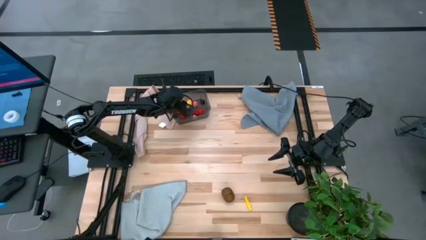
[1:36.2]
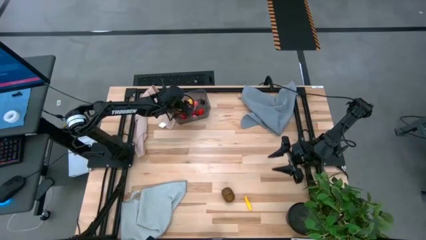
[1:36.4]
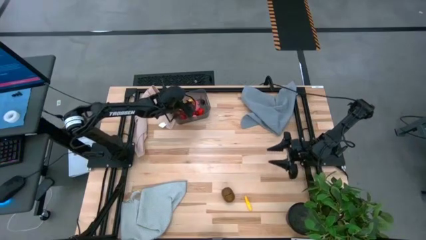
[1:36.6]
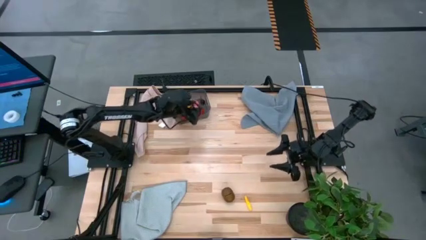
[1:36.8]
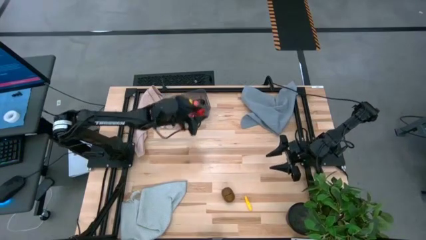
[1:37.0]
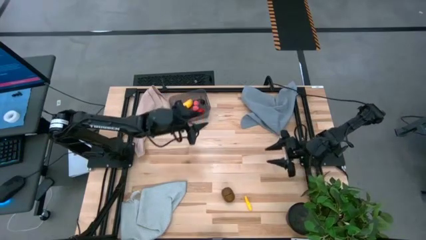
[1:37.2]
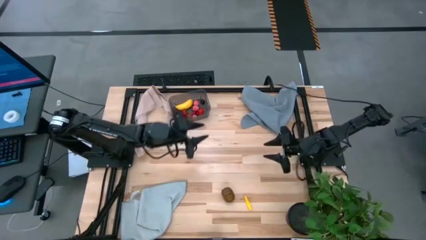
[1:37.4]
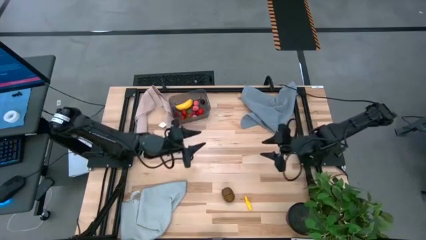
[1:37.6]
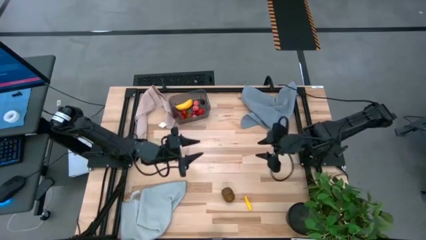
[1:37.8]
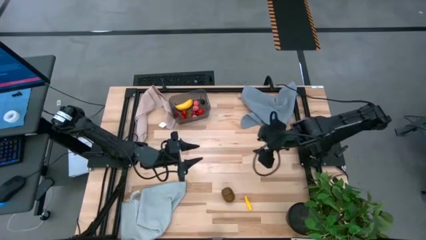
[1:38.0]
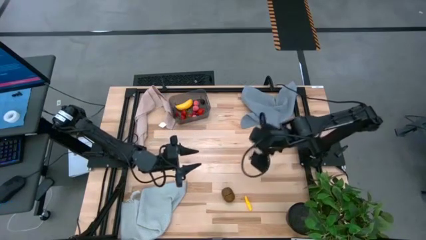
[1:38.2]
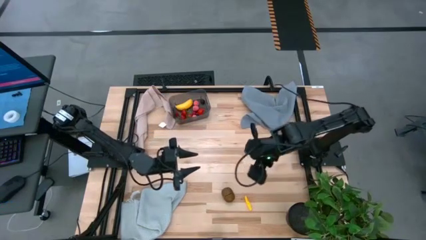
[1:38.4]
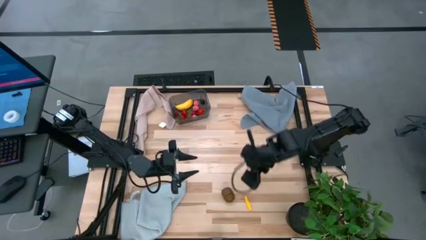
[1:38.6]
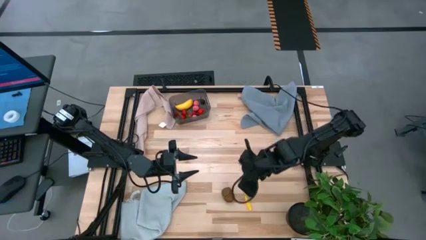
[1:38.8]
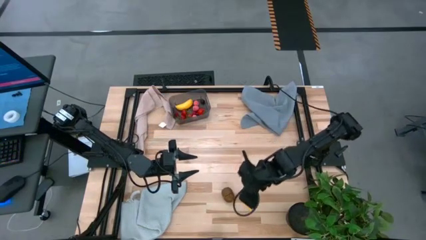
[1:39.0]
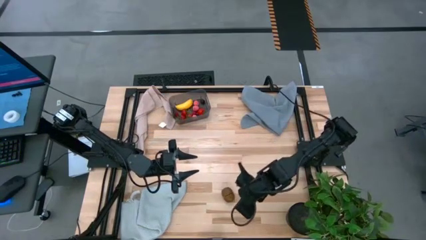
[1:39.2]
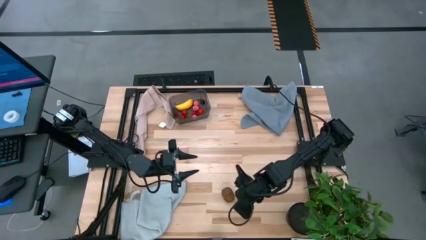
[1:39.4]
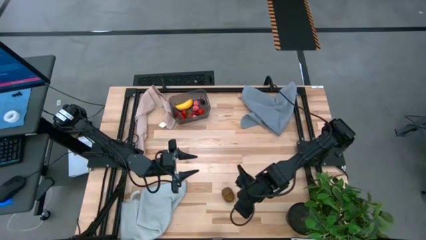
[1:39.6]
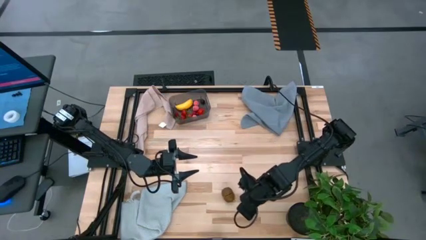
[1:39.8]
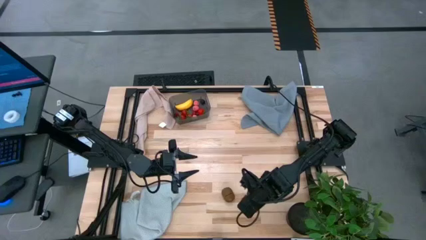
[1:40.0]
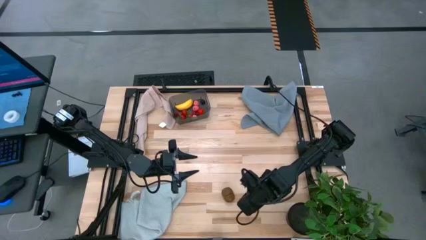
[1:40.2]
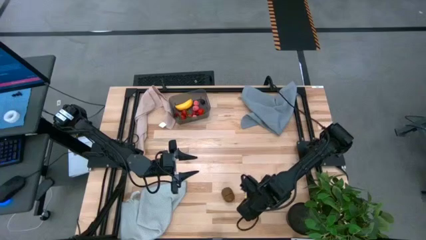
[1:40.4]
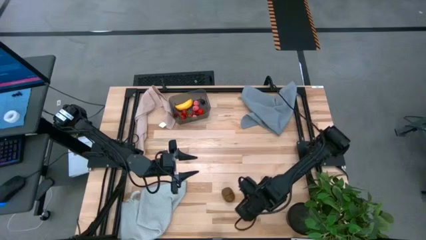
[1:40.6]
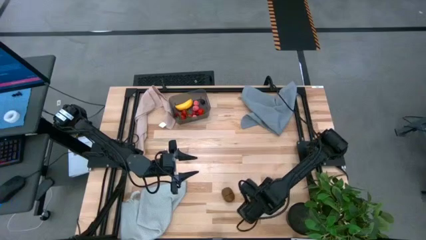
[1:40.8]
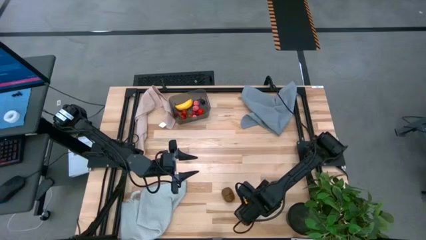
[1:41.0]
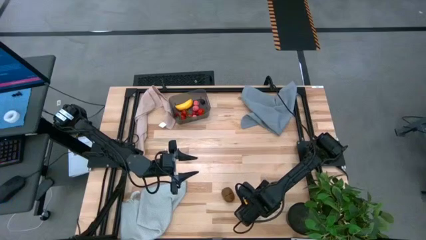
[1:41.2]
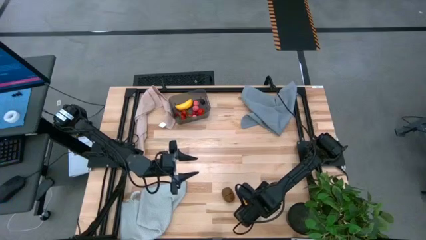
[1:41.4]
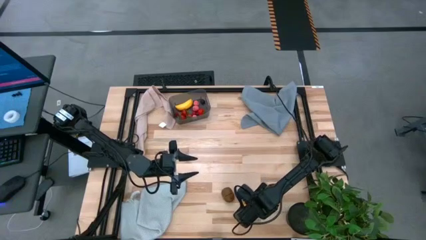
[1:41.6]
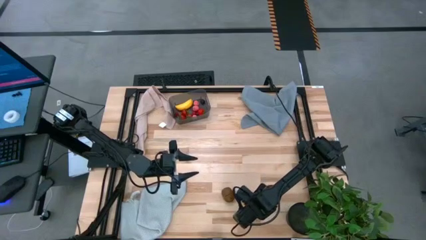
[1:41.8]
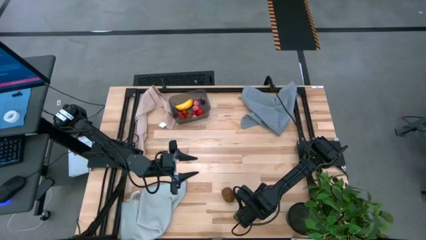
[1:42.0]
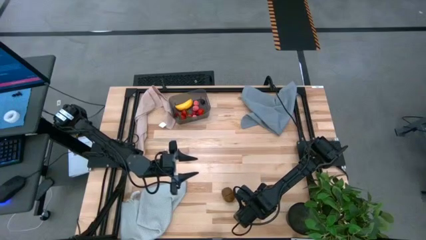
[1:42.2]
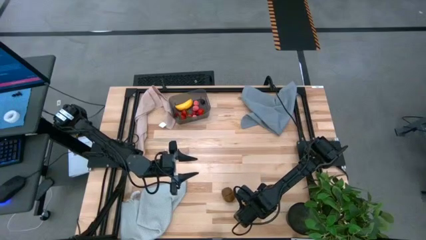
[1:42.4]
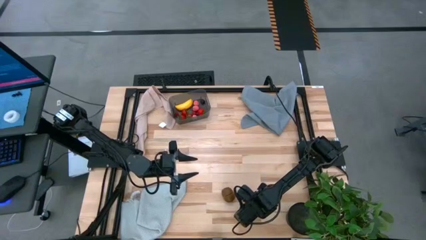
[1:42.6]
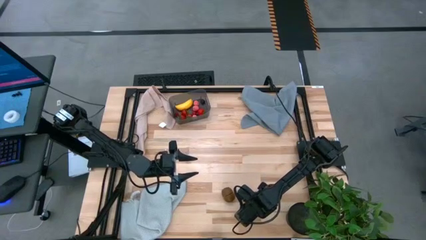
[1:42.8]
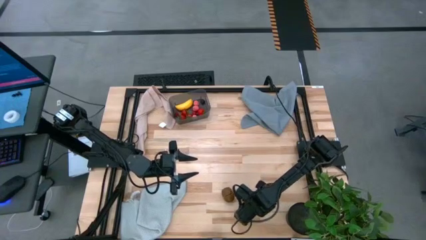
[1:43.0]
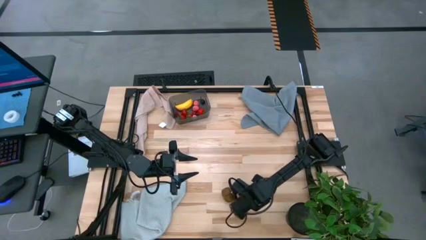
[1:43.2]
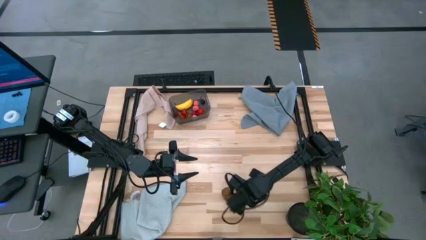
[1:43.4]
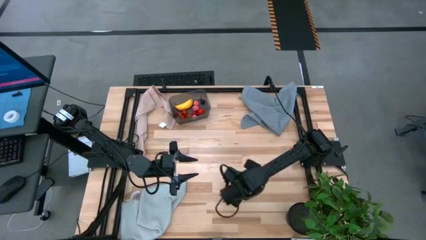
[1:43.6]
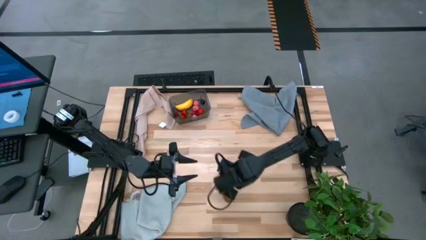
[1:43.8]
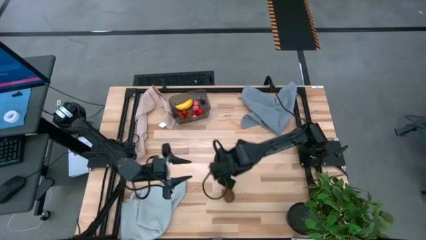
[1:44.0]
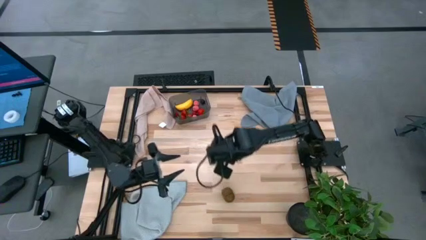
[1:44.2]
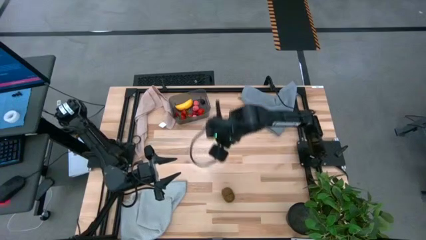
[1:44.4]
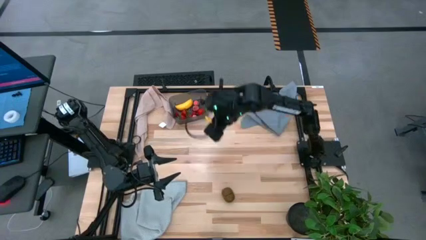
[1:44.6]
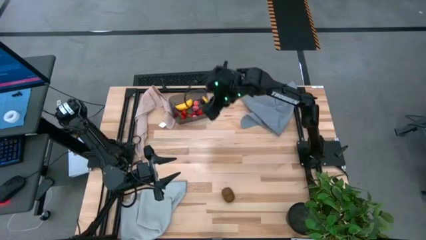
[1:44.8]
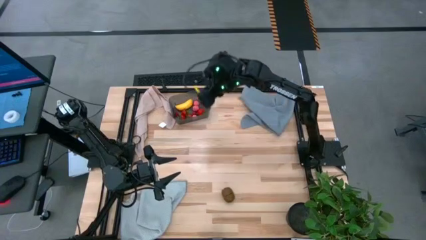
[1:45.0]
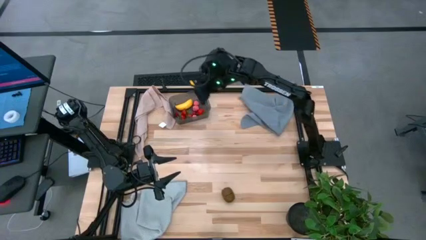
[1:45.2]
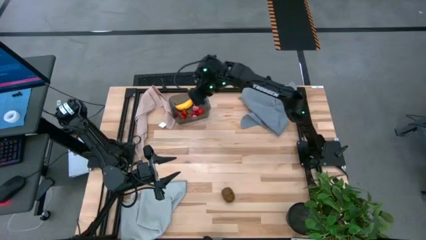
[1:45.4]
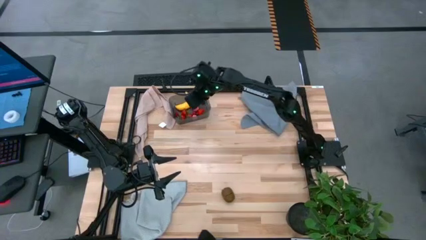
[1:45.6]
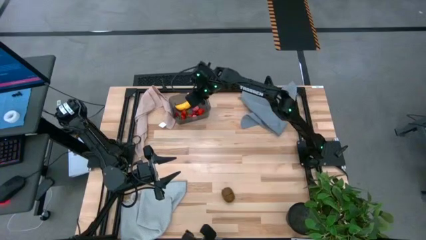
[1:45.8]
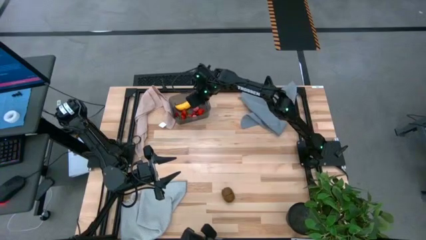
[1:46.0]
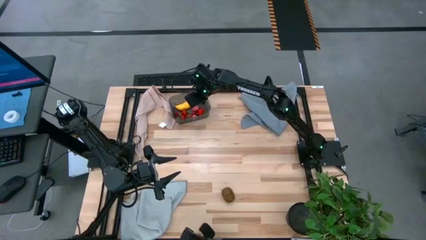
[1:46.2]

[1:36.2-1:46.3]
Task: Pick and placing Produce into tupperware
Put the yellow corn into the black bin

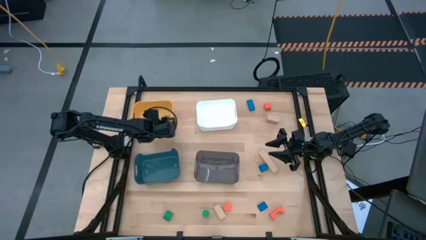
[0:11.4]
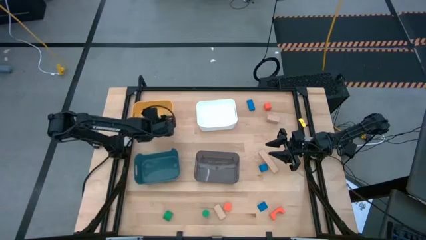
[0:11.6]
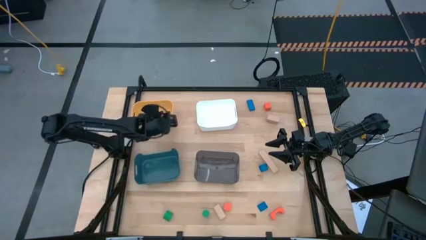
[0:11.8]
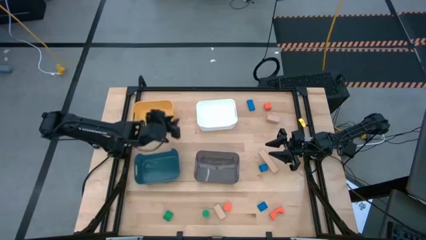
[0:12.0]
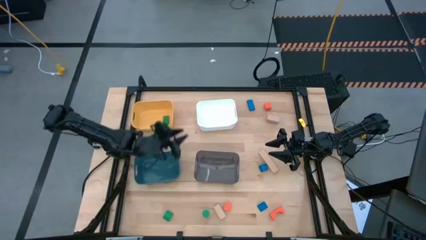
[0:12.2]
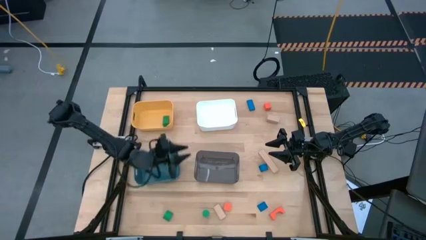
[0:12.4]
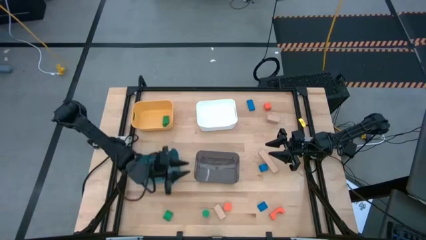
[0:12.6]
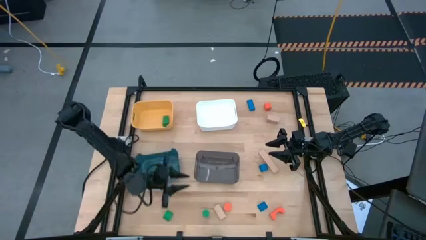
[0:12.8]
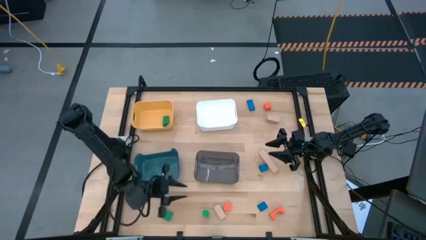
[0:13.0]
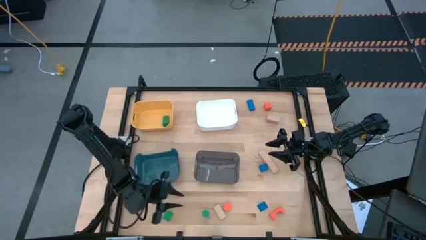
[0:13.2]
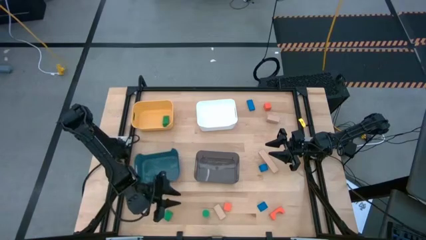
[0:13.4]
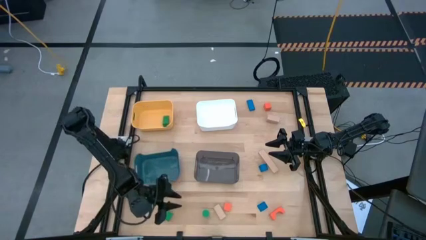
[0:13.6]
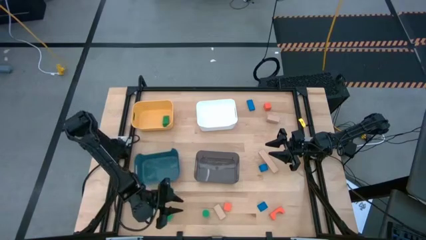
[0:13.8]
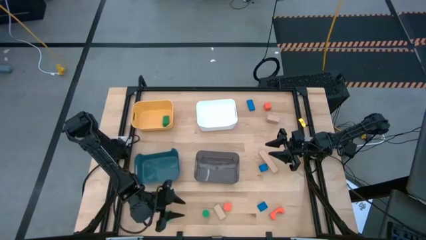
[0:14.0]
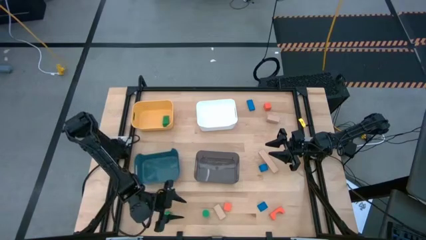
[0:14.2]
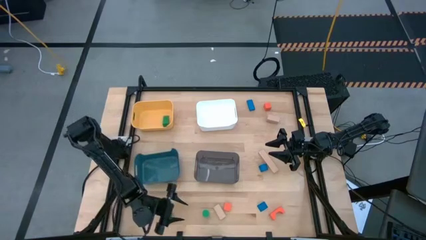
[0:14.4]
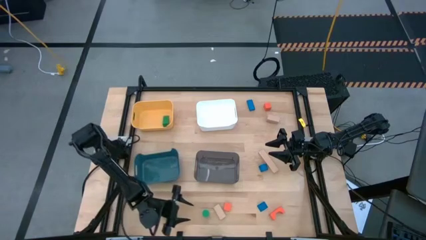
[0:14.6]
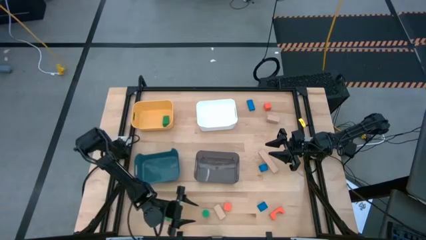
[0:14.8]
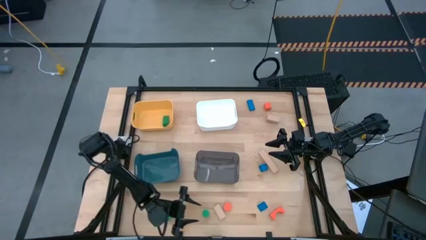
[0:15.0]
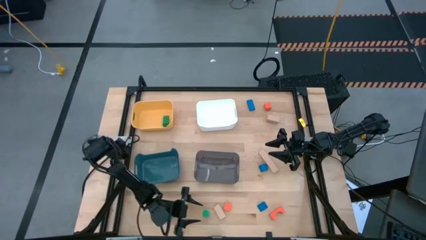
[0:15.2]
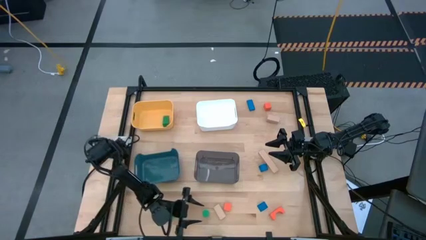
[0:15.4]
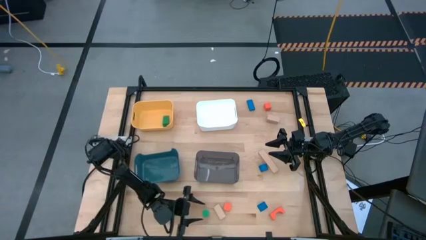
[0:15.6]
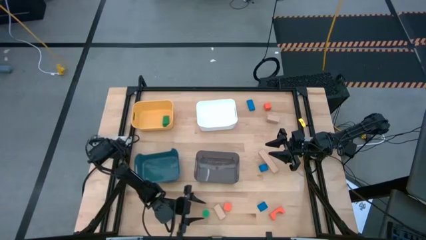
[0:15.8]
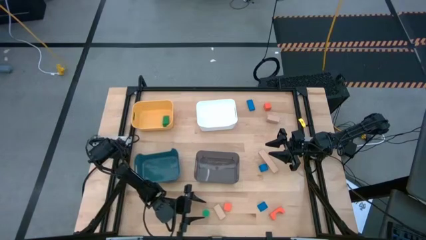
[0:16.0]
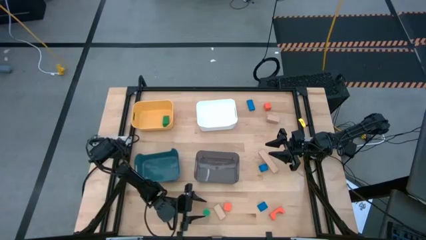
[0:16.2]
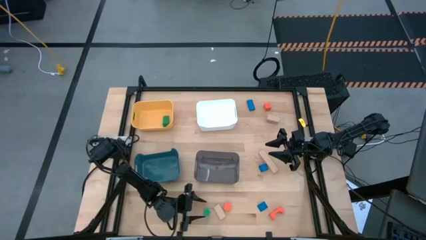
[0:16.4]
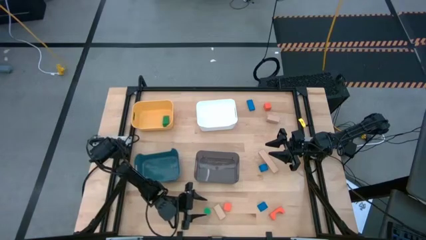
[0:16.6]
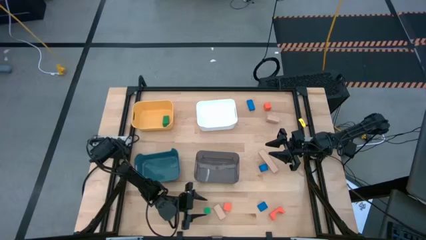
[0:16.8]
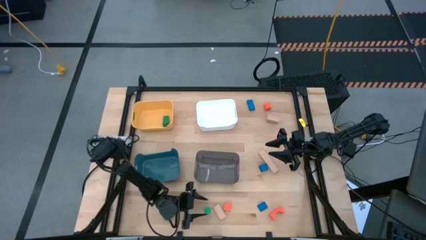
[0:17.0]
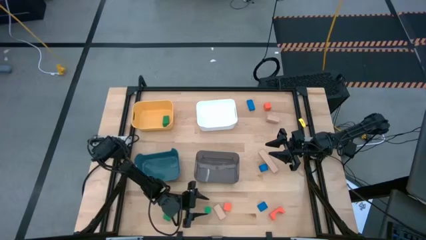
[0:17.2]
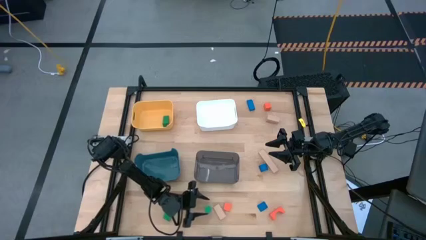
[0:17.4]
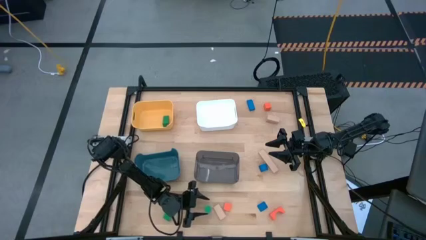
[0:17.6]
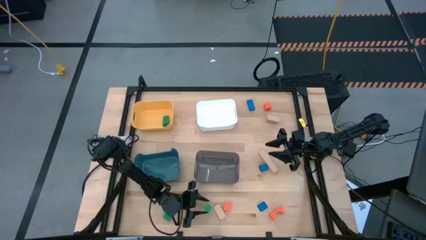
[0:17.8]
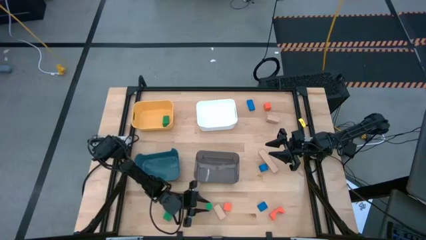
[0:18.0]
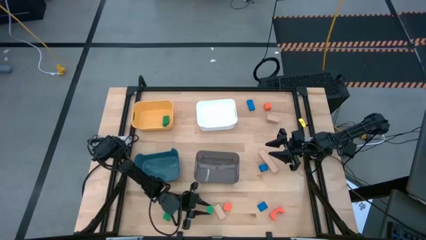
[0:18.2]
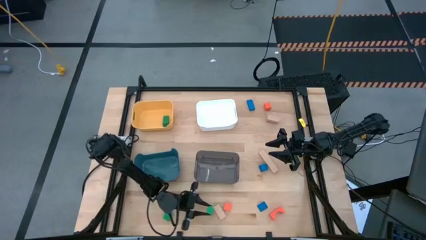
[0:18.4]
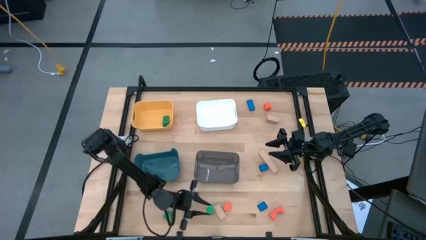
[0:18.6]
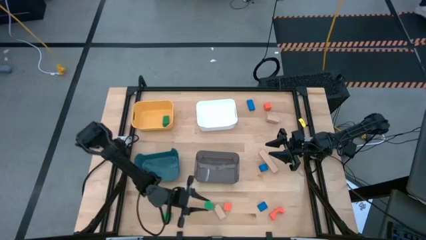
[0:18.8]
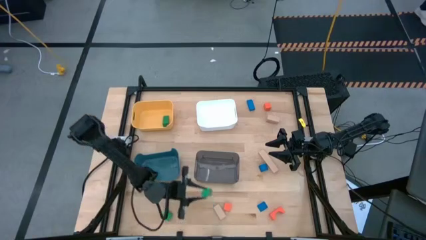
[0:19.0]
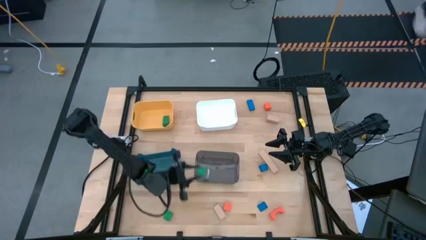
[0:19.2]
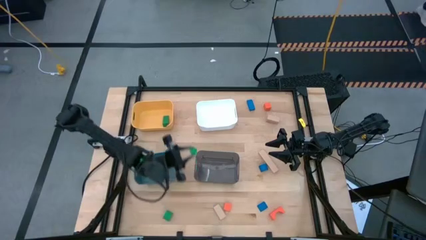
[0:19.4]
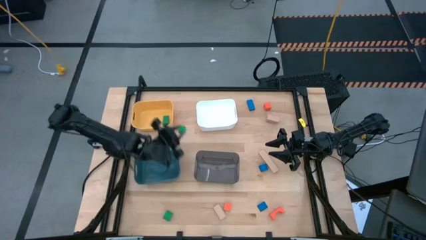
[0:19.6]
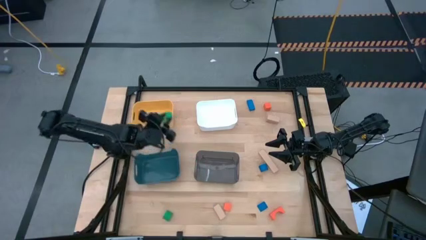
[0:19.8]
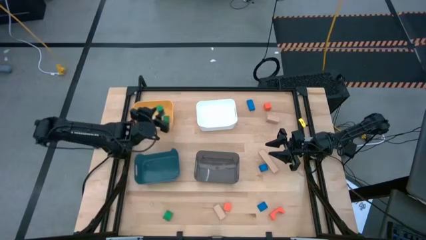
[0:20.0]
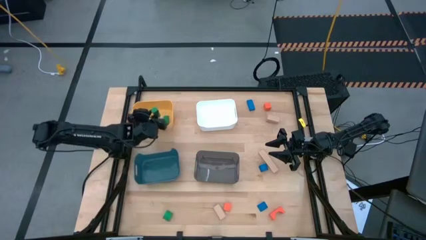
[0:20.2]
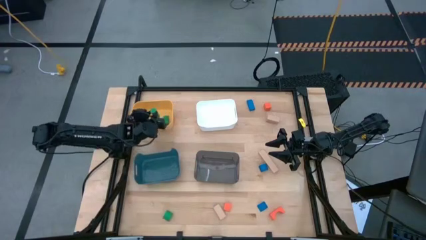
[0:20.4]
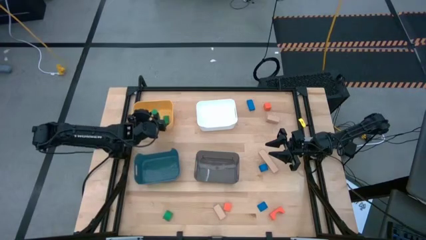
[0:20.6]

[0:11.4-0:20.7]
Task: Sort & place blocks by color
Put the right green block into the yellow bin
